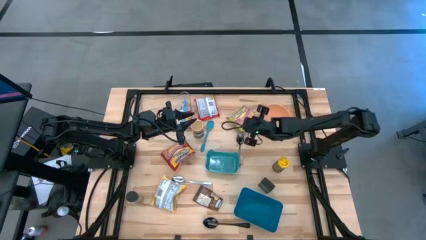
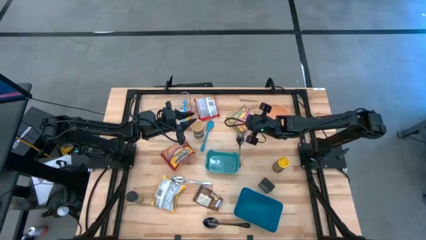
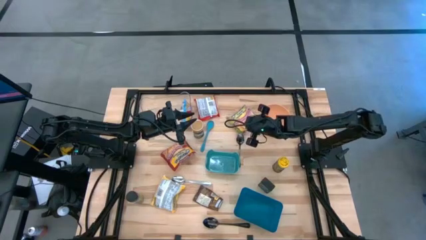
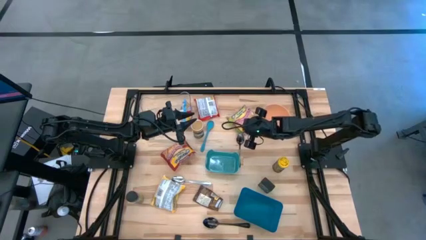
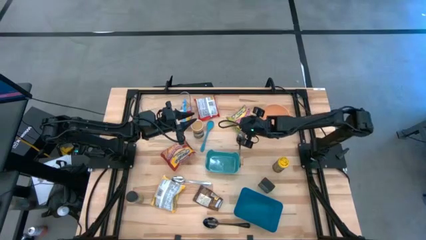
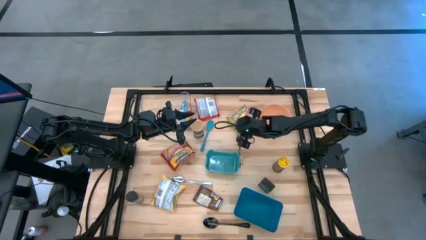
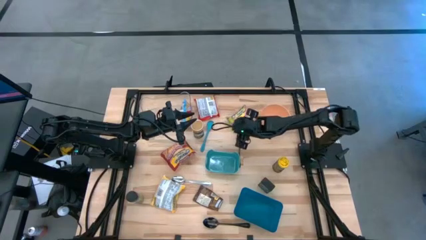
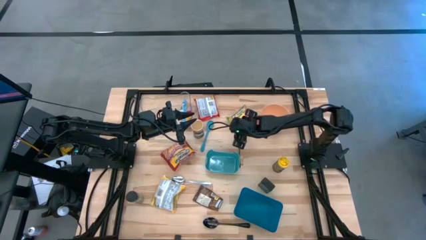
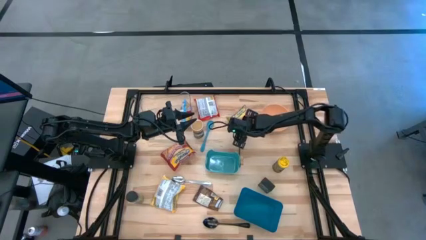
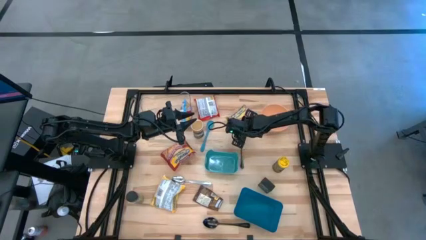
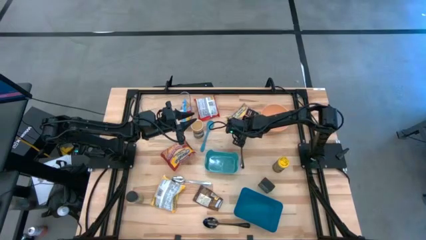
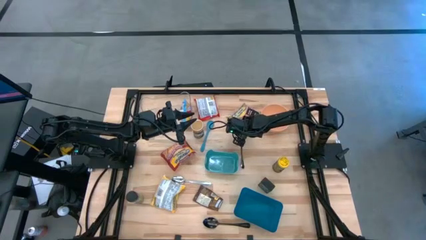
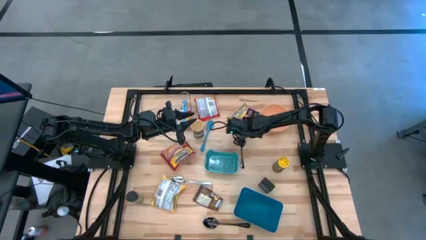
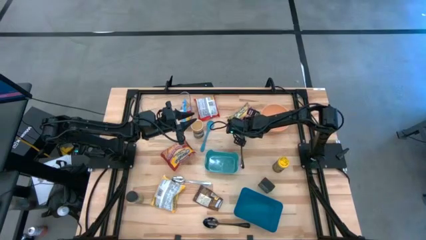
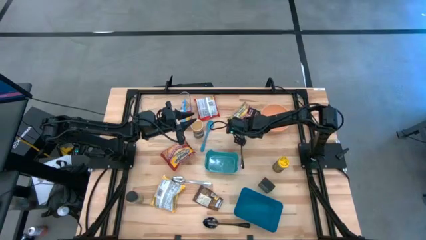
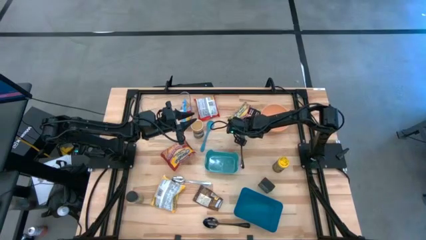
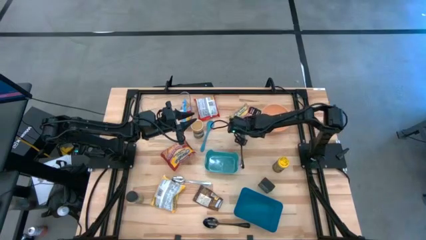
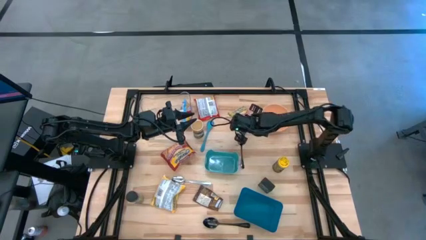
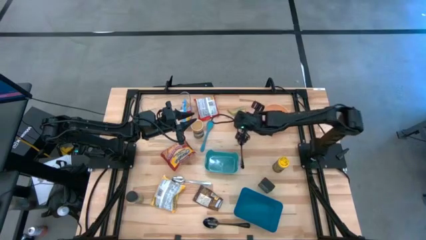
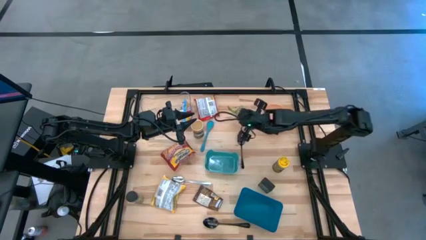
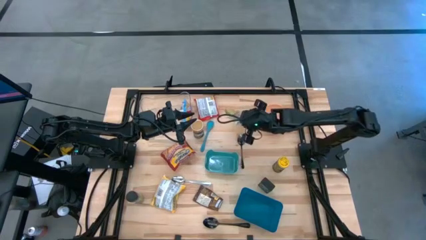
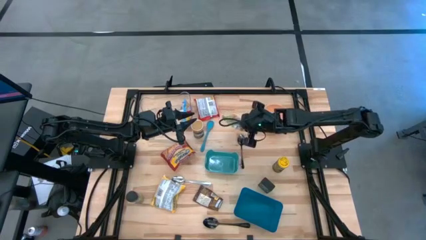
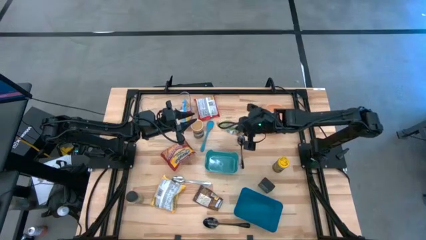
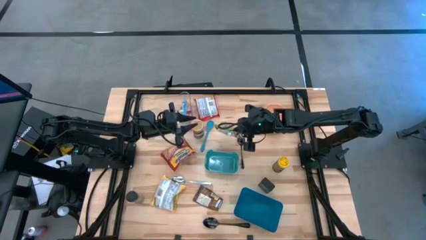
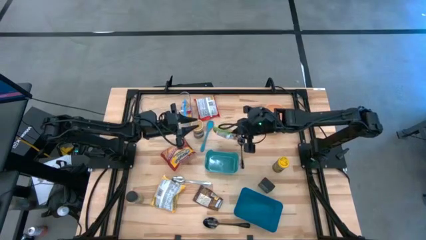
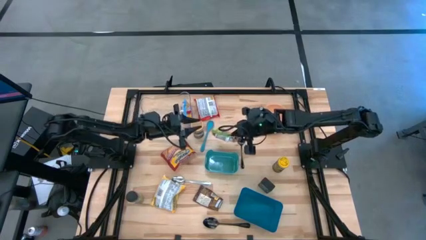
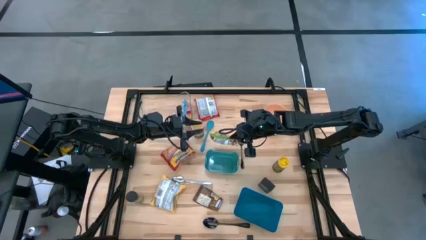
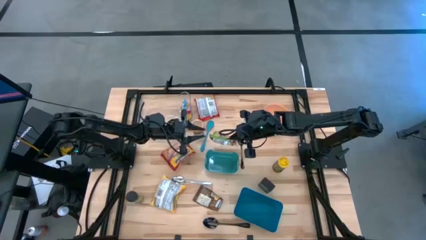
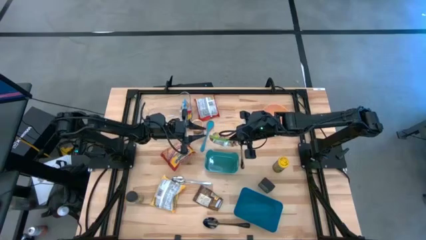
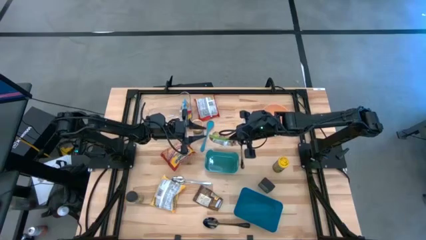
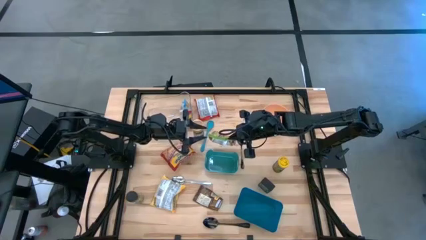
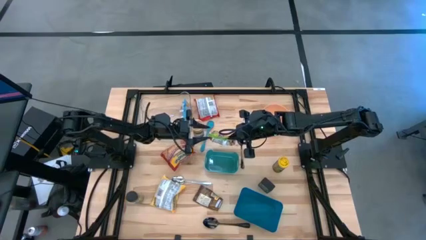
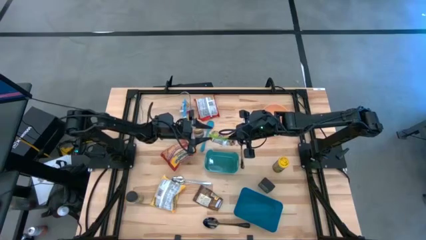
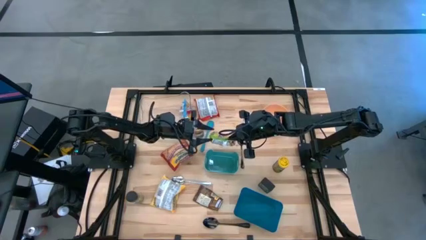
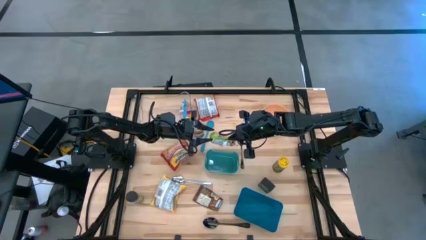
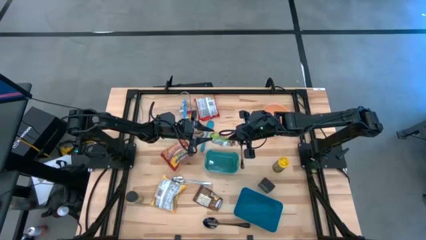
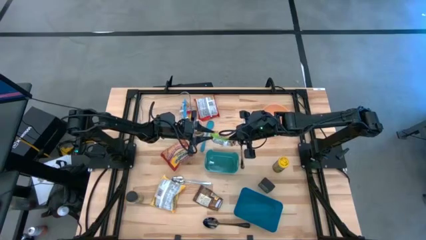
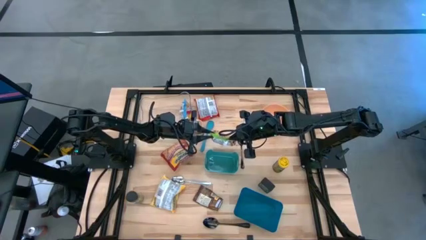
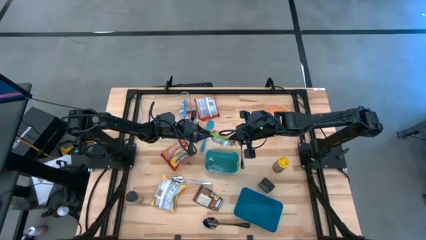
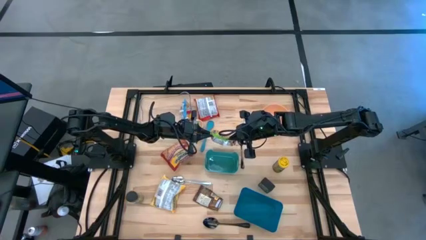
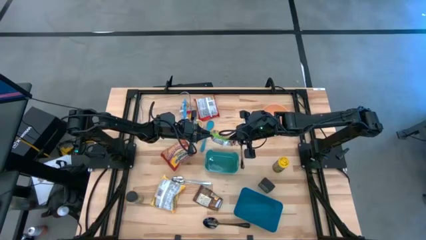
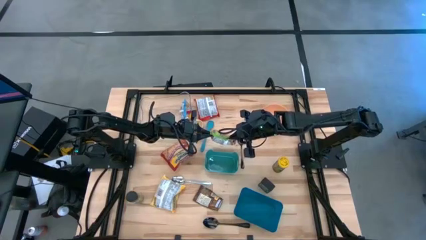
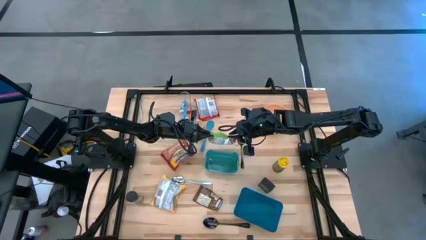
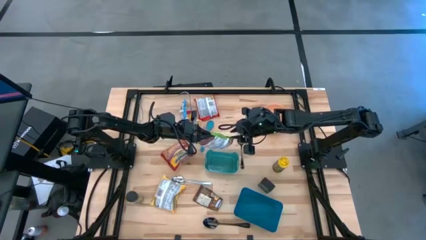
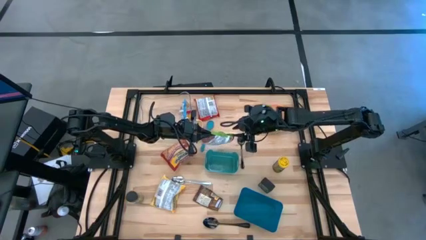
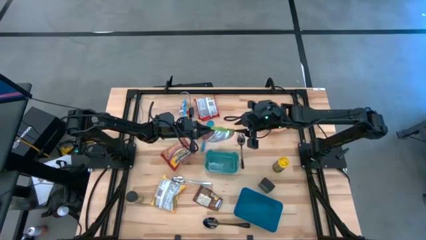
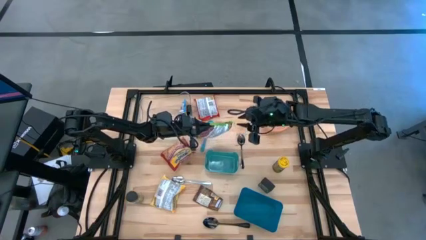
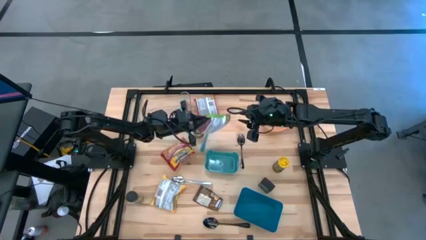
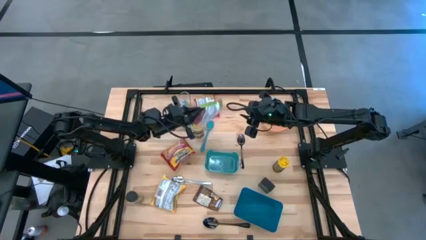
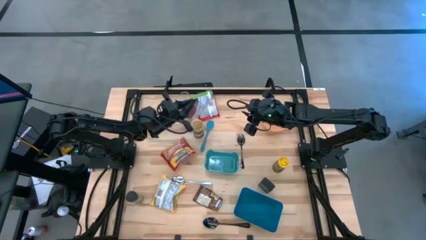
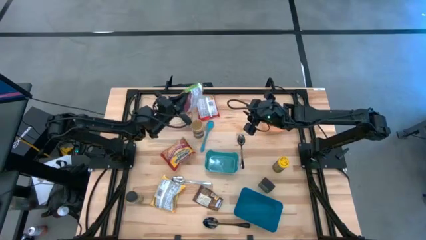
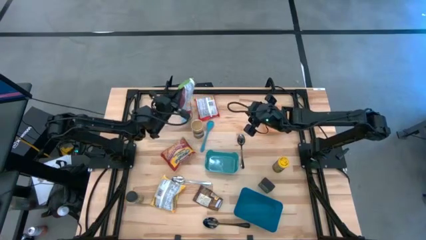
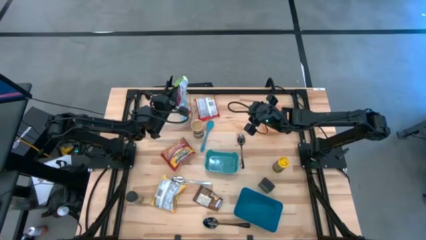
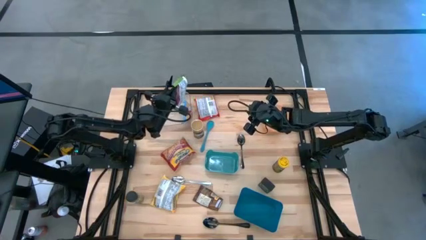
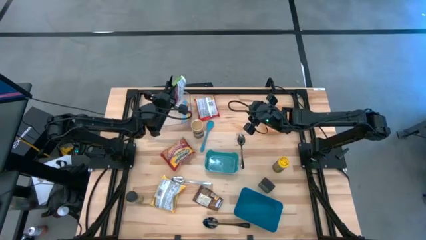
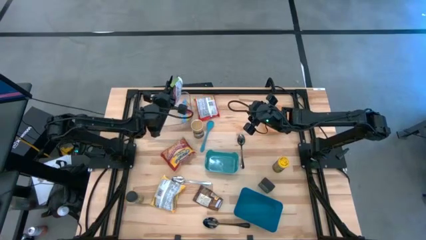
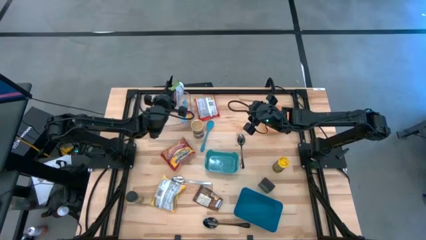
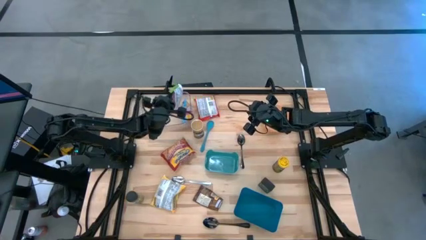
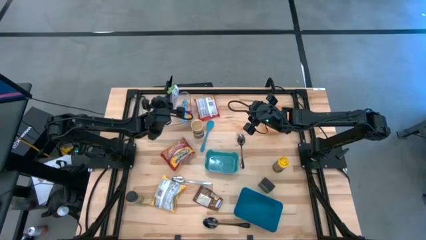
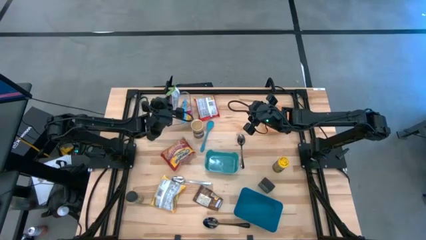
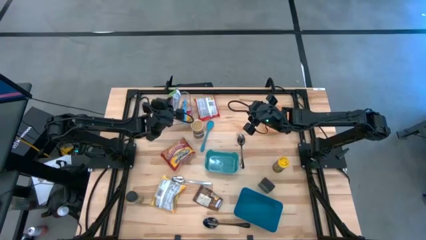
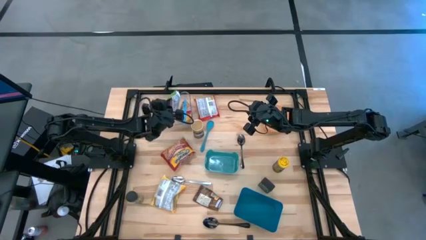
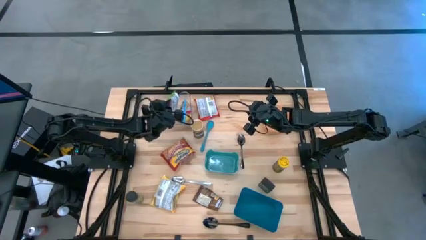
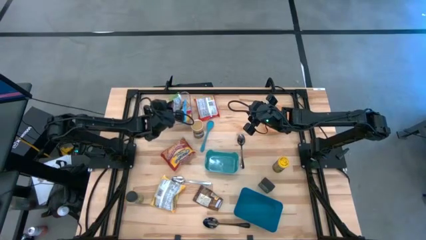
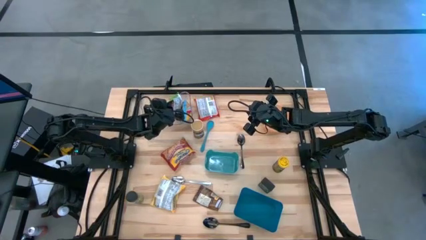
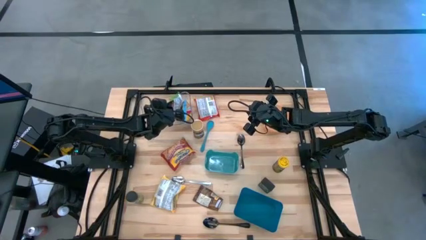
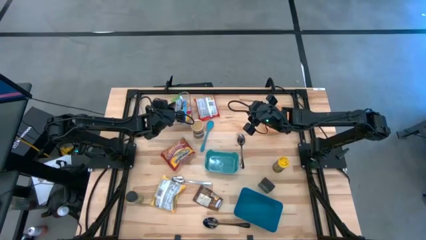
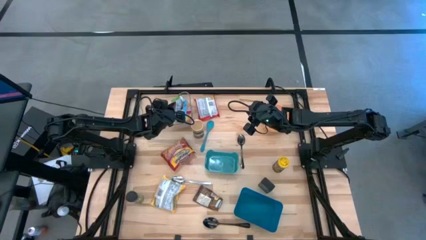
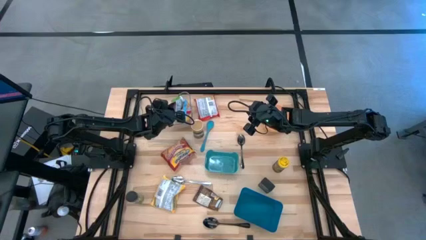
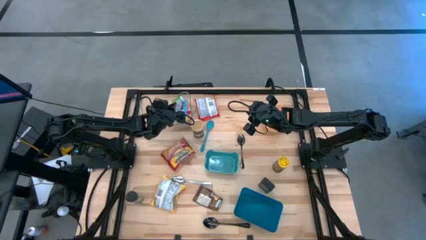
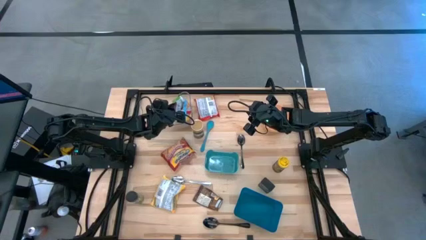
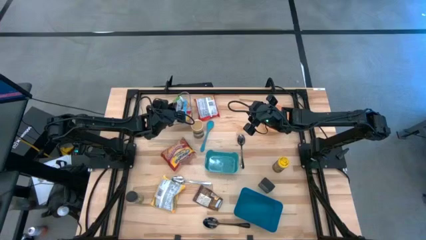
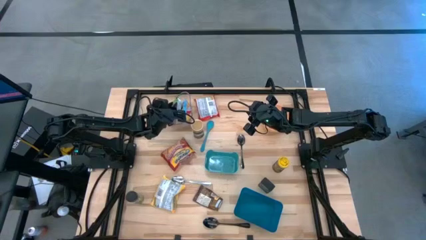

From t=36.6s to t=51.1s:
Task: Pick & Place Food Item
Put the green noodle pack into the transparent bin
